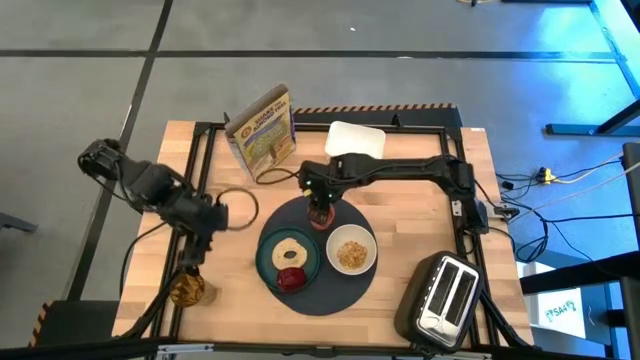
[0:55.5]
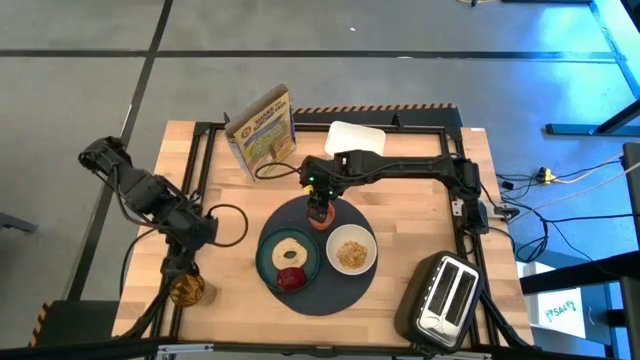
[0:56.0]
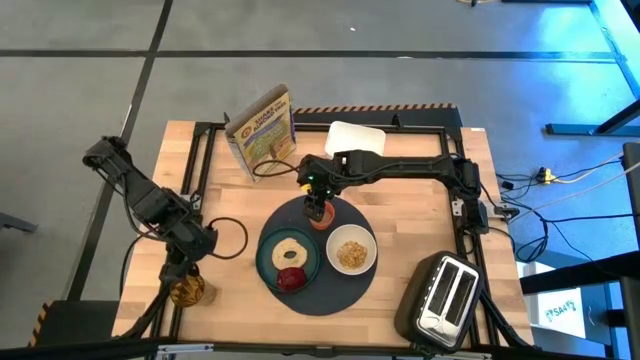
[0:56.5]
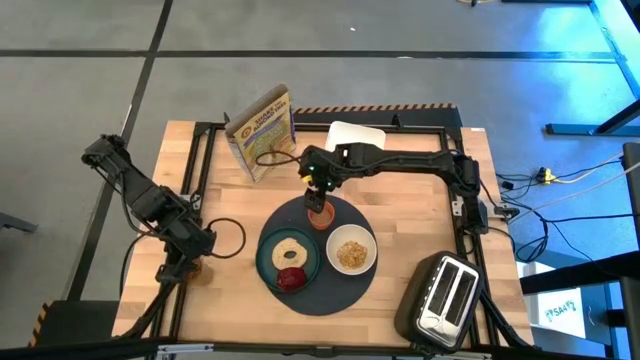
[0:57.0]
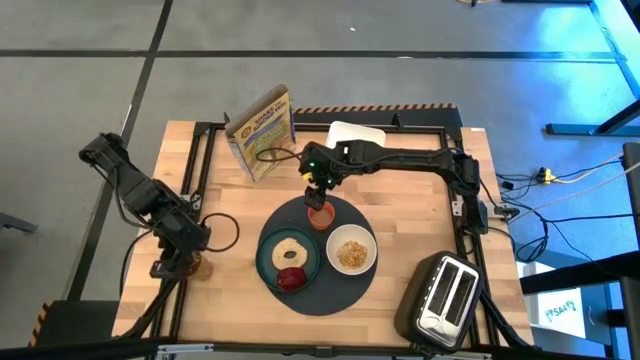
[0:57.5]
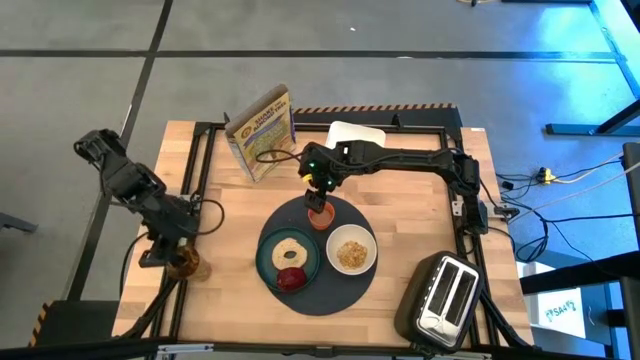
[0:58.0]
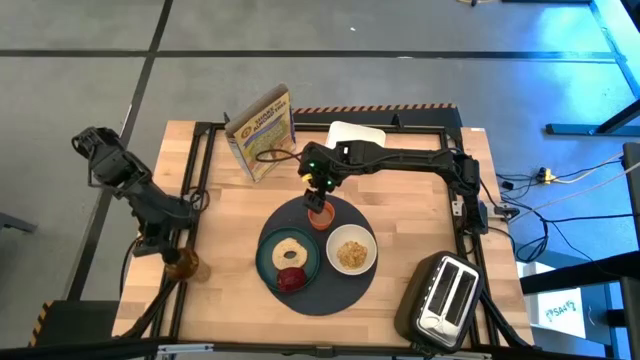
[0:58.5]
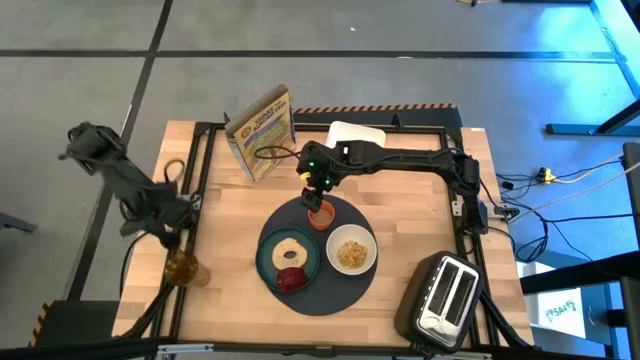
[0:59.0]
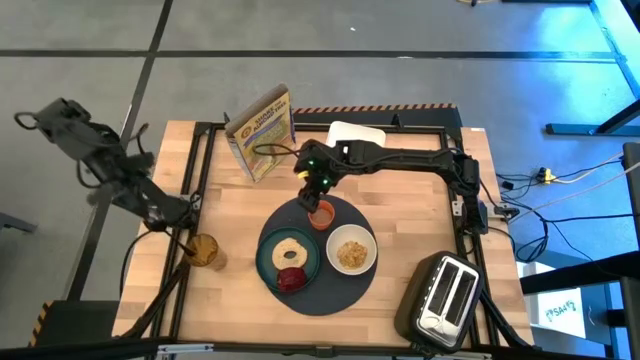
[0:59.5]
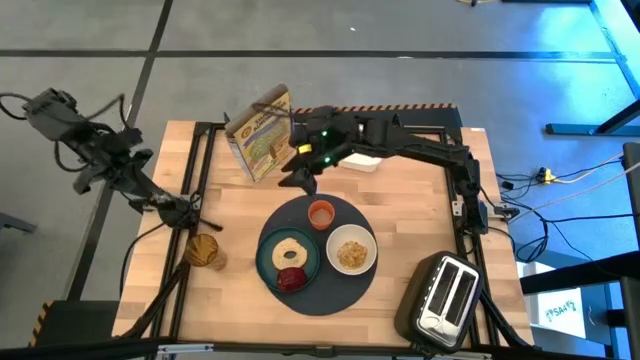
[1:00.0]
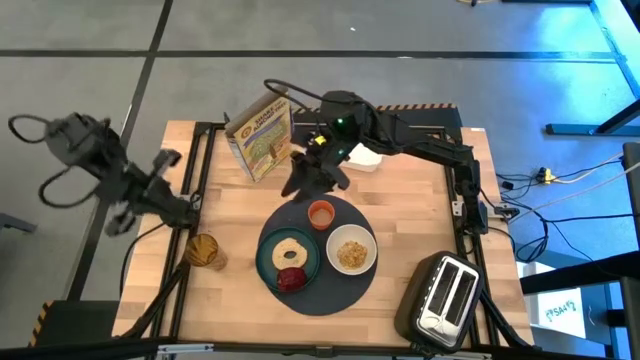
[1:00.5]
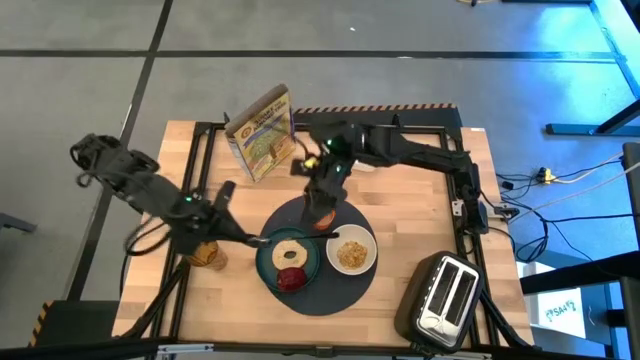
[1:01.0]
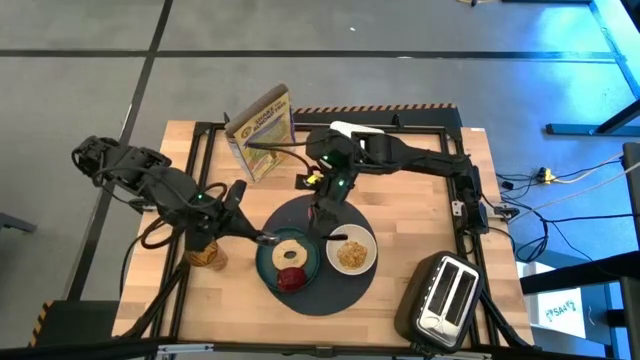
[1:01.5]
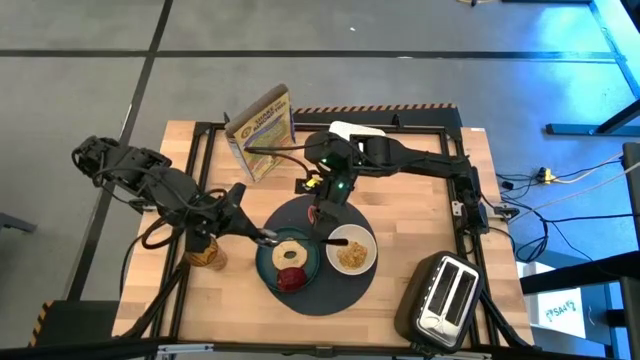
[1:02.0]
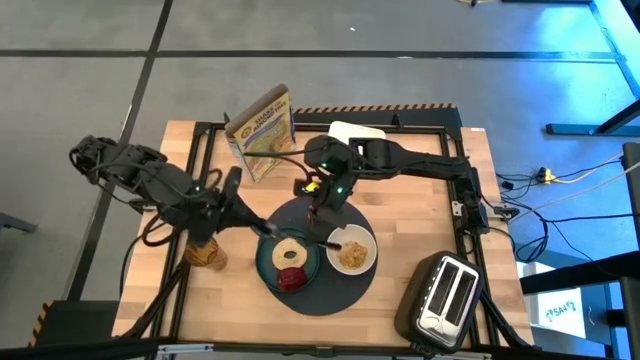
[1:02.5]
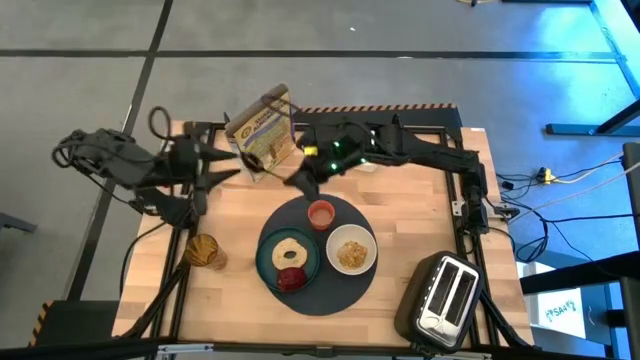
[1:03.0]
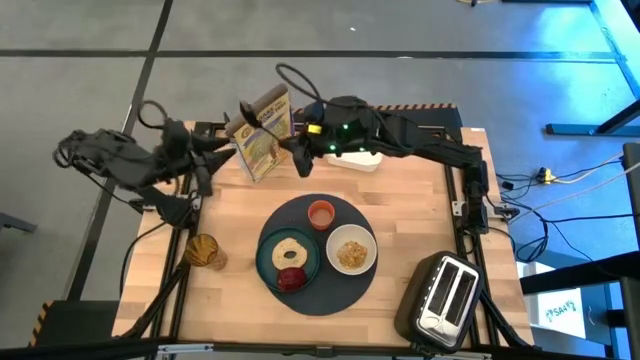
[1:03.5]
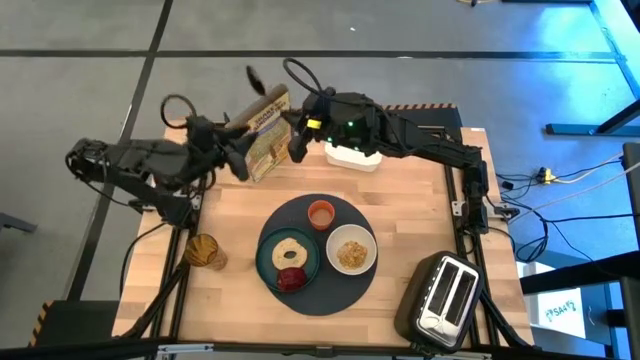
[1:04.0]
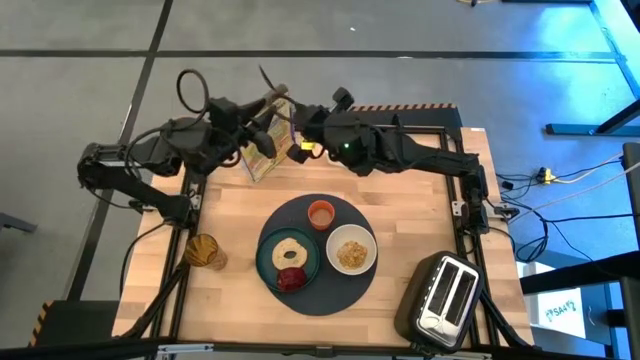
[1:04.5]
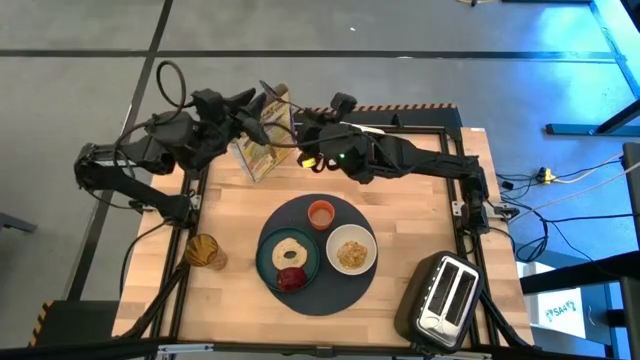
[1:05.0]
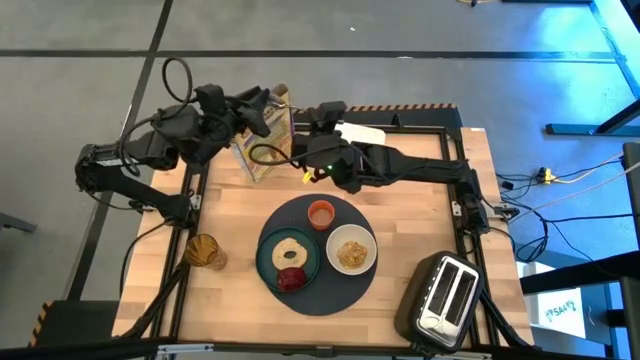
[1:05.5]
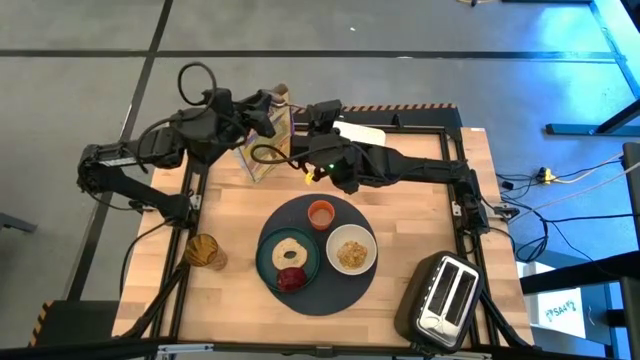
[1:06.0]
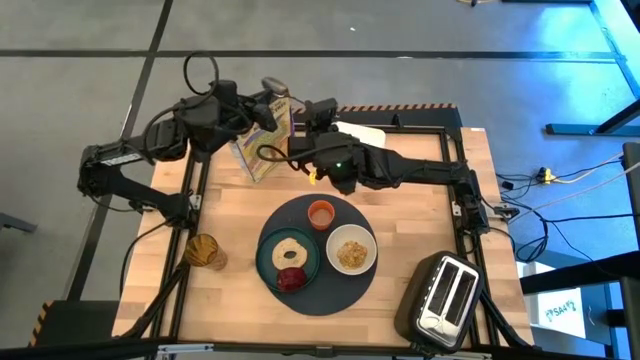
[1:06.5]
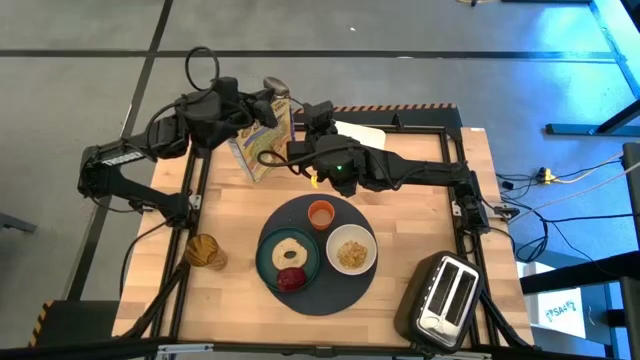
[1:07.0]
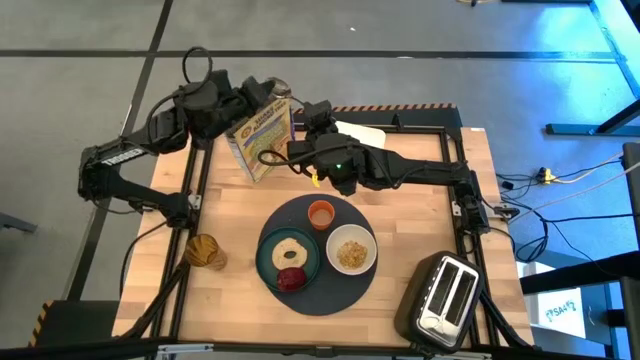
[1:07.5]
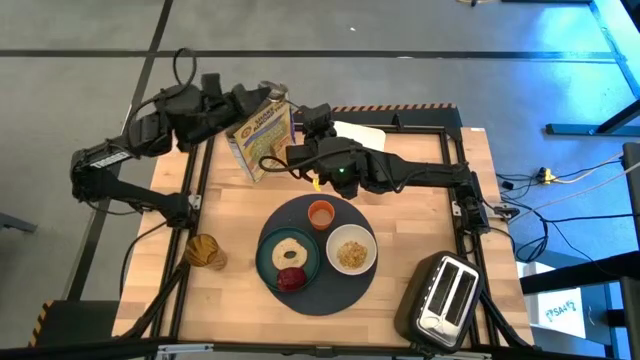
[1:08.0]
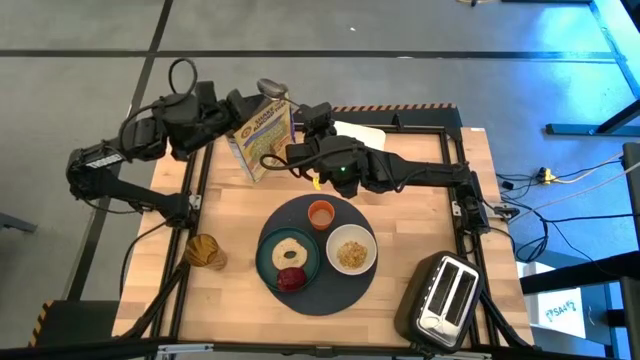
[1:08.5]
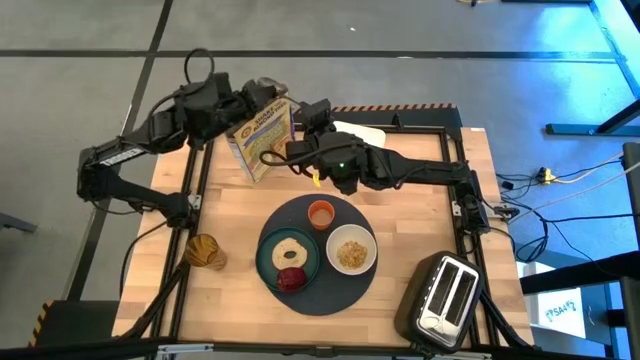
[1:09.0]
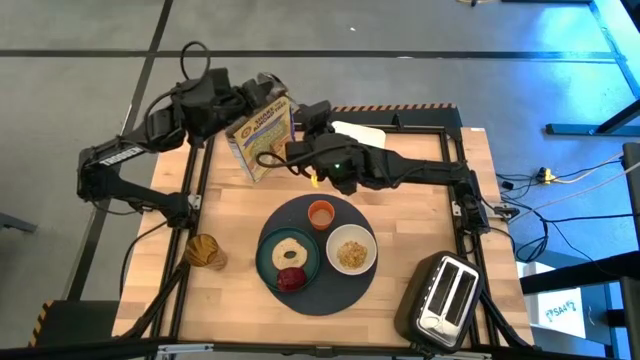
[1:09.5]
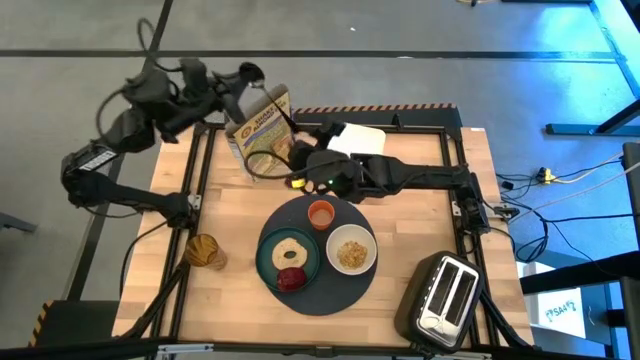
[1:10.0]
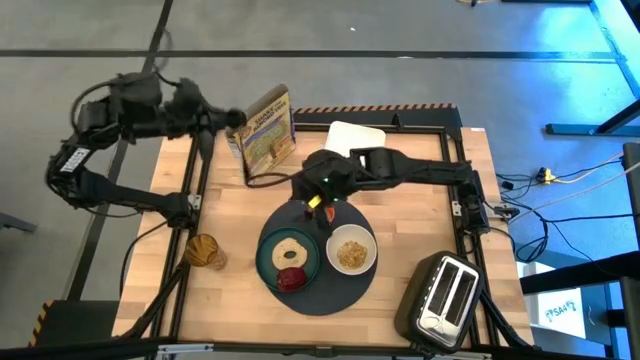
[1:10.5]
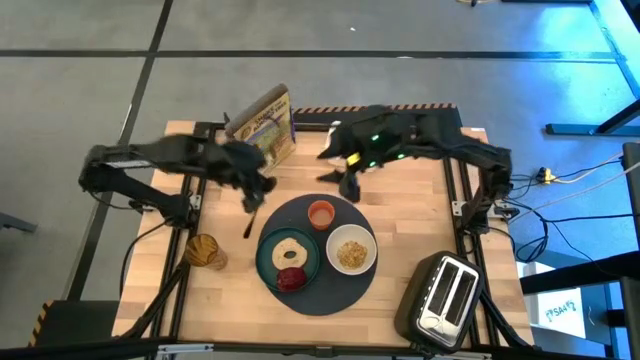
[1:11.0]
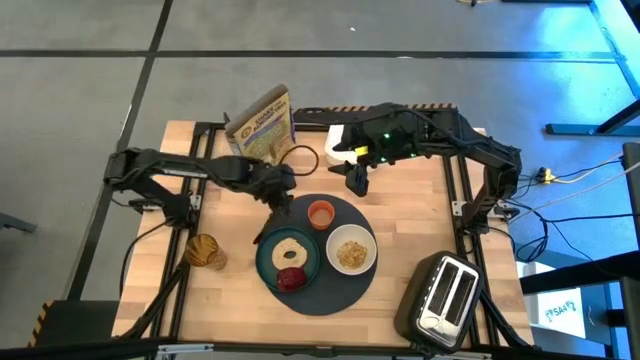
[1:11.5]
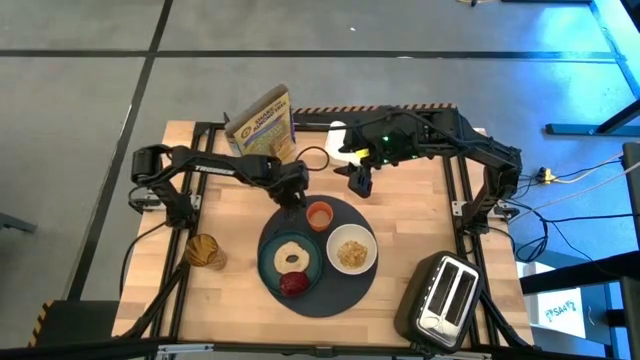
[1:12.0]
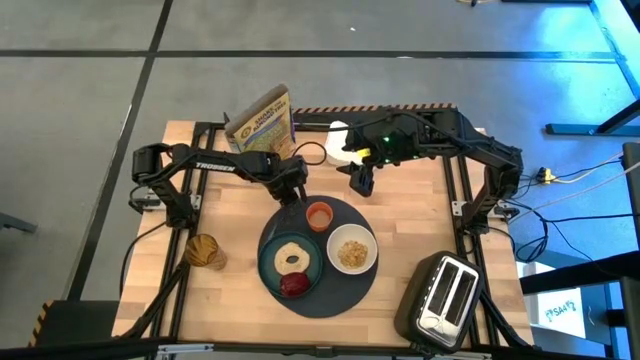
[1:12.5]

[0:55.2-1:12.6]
Task: Arrange a breakfast setting
Put the black spoon on the black mat

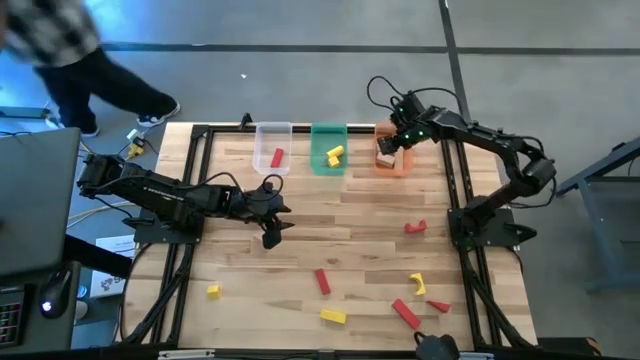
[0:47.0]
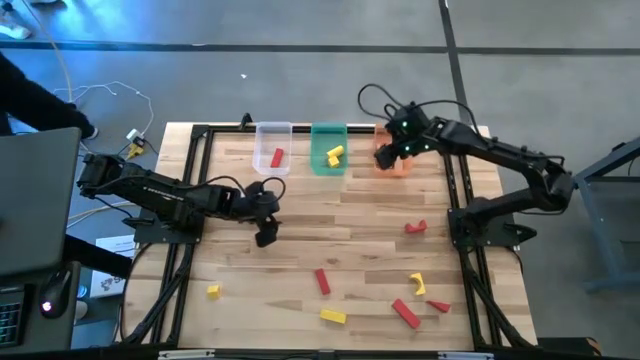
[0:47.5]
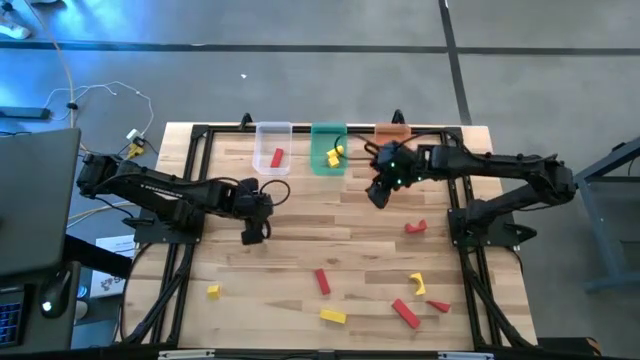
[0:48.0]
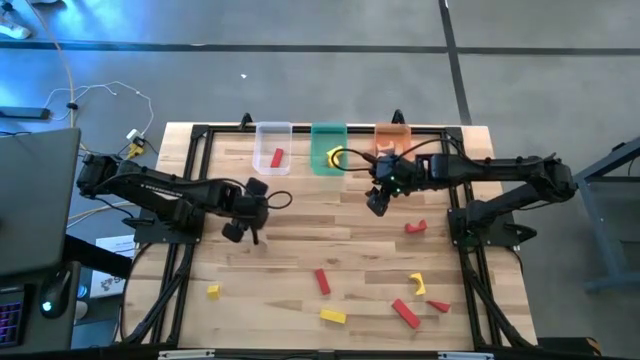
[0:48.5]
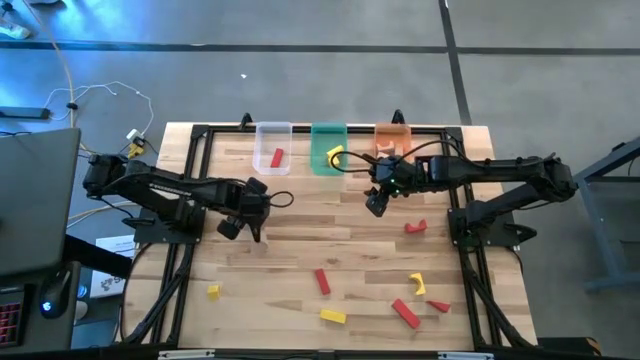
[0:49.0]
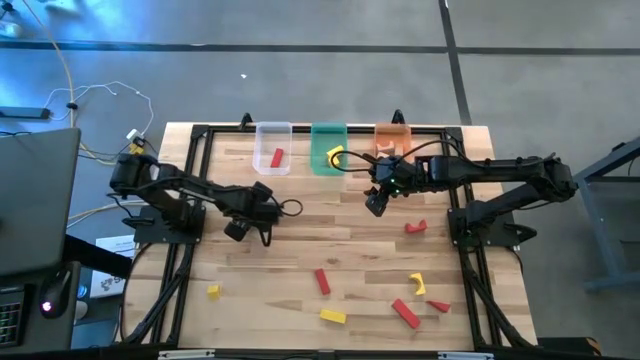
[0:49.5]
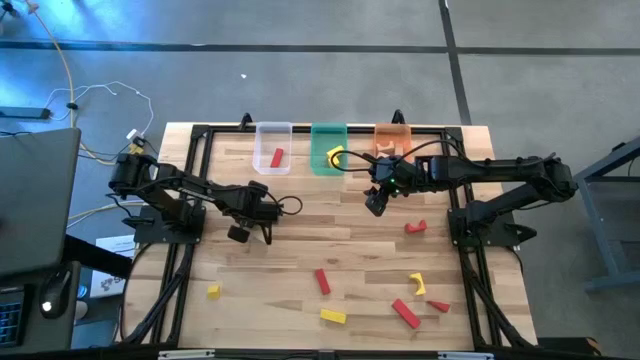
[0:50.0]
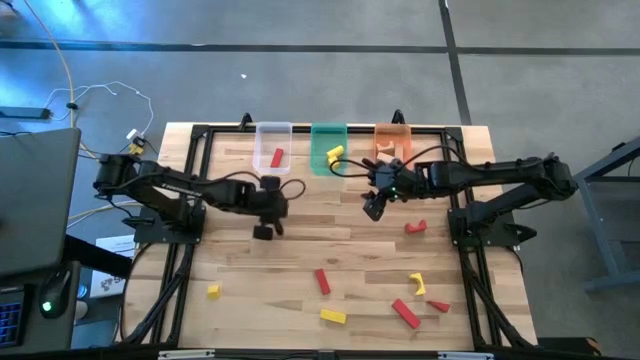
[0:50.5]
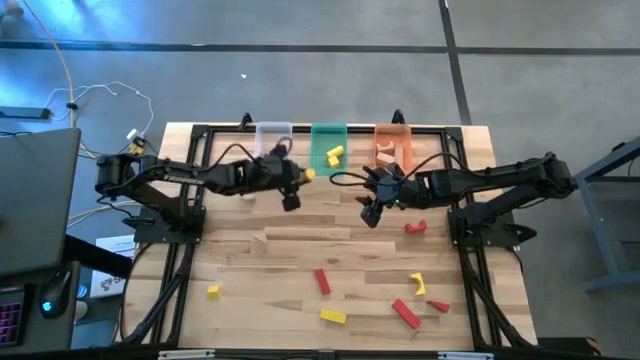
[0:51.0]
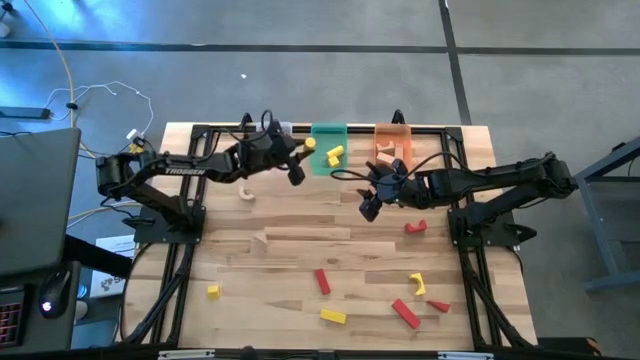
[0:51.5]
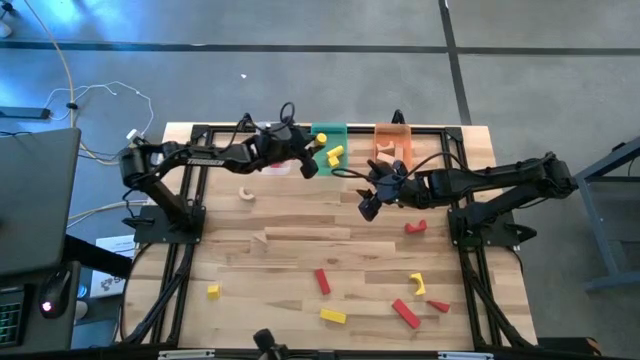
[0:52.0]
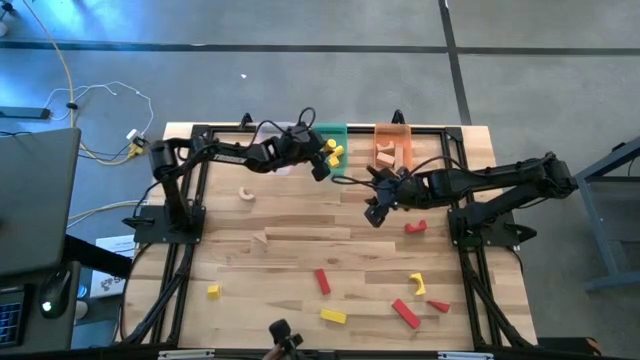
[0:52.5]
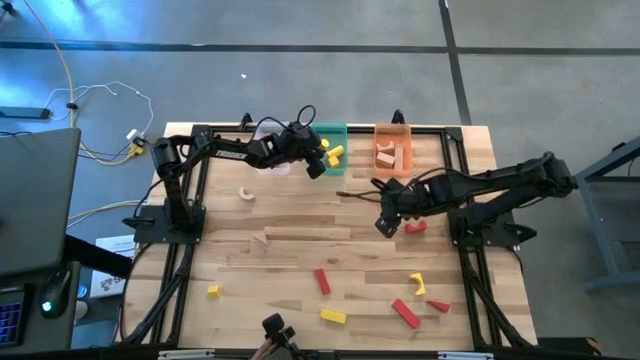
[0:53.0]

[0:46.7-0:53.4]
Task: Sort & place blocks by color
Put the yellow block into the green bin
